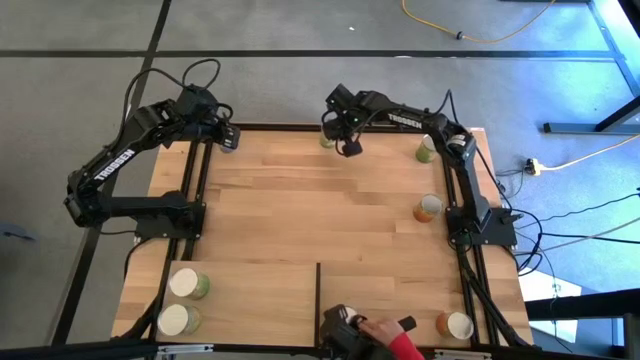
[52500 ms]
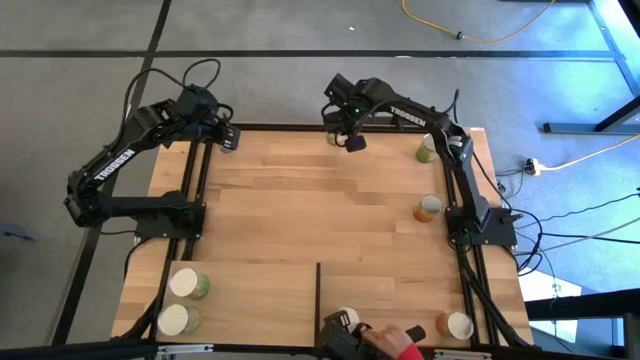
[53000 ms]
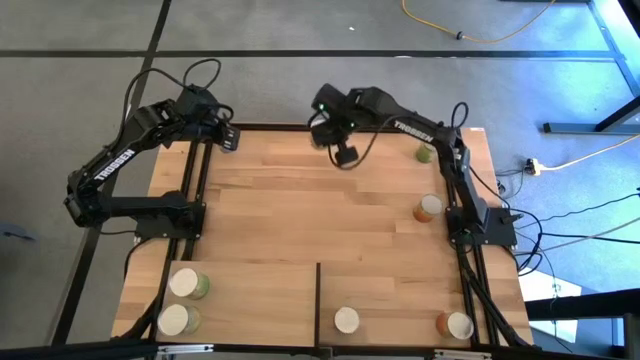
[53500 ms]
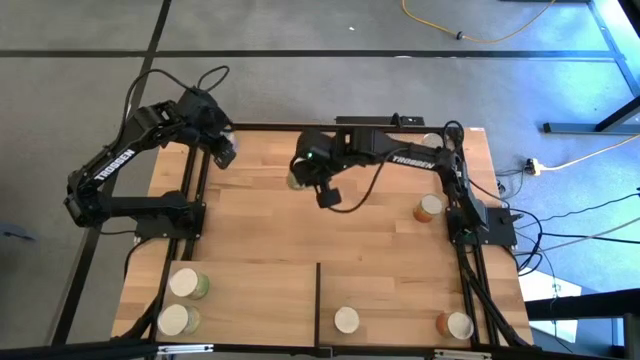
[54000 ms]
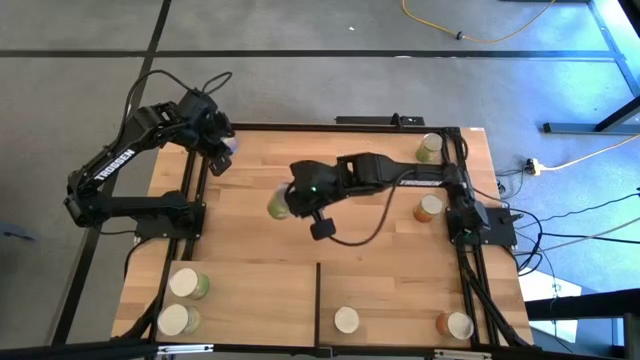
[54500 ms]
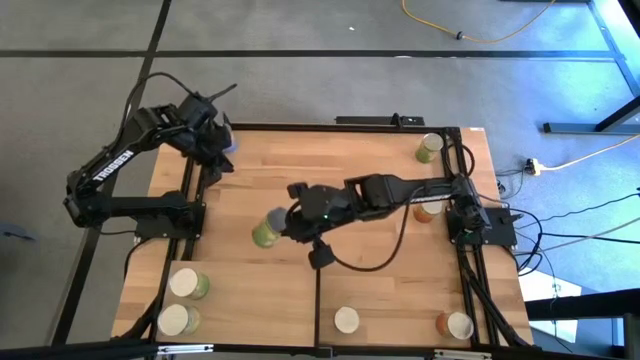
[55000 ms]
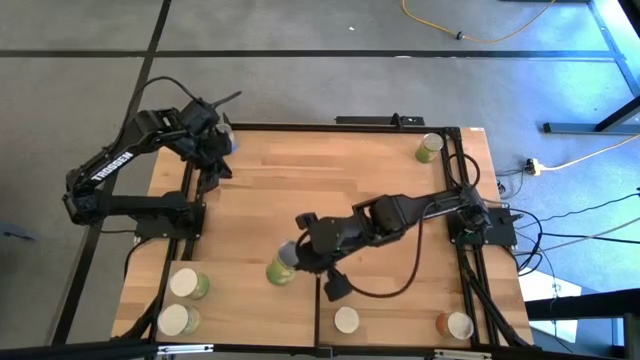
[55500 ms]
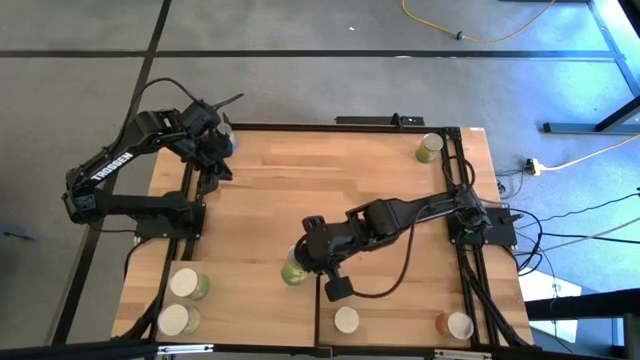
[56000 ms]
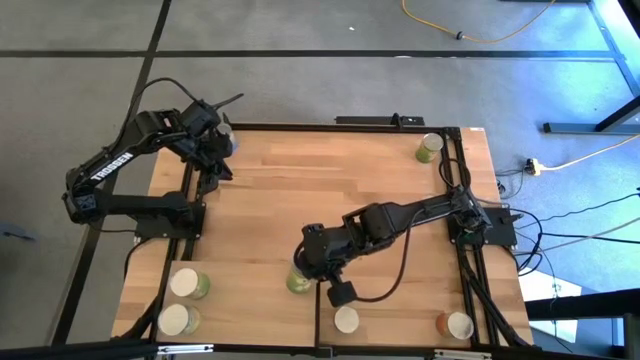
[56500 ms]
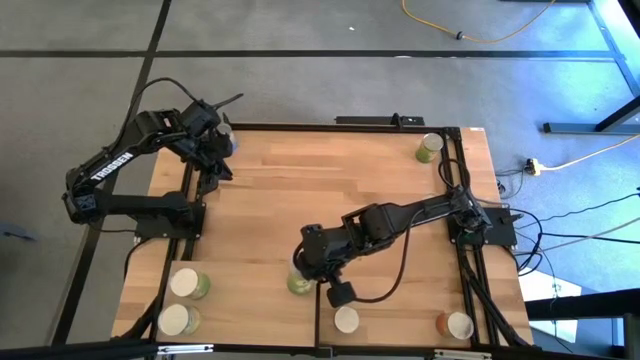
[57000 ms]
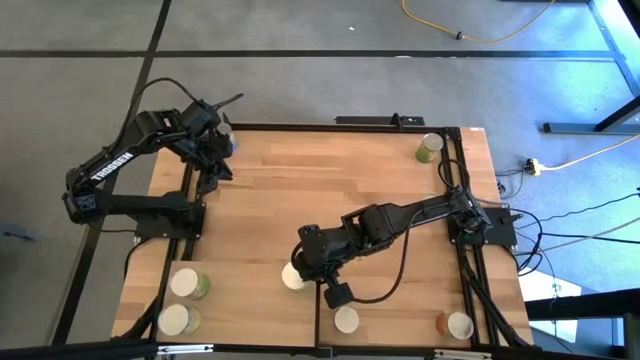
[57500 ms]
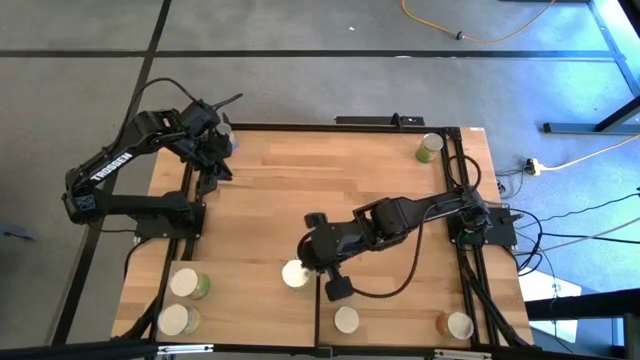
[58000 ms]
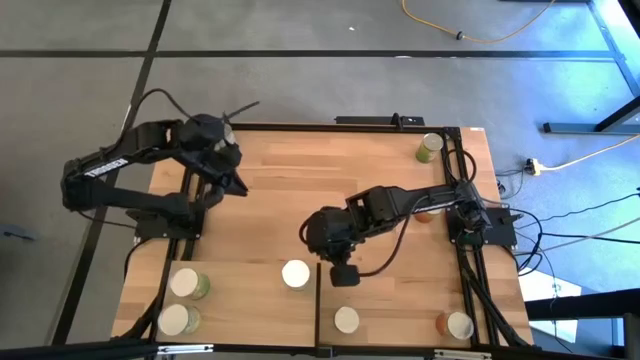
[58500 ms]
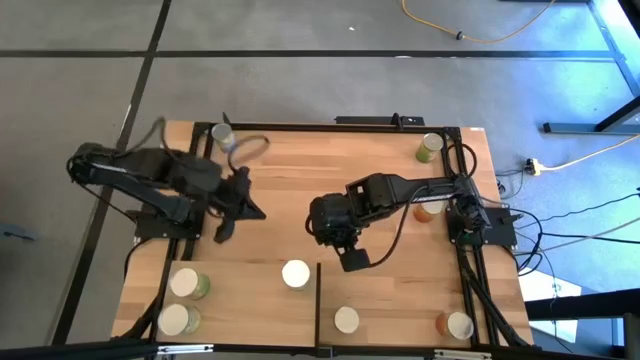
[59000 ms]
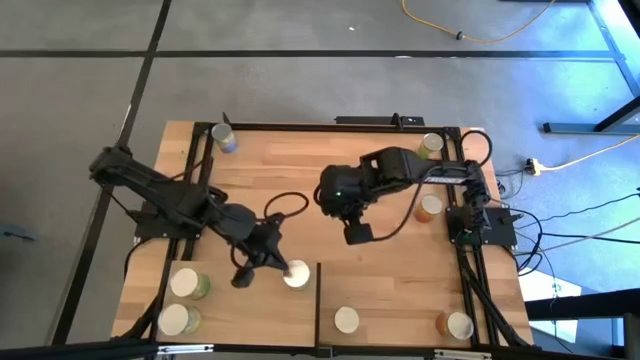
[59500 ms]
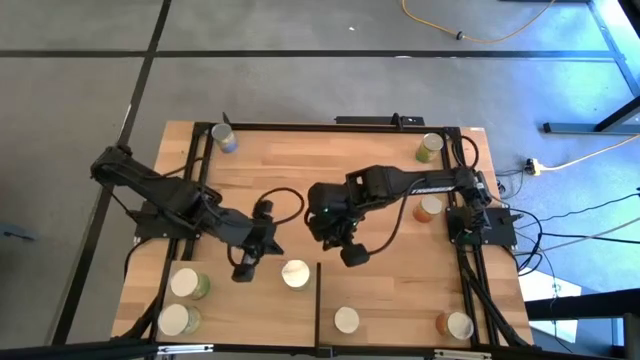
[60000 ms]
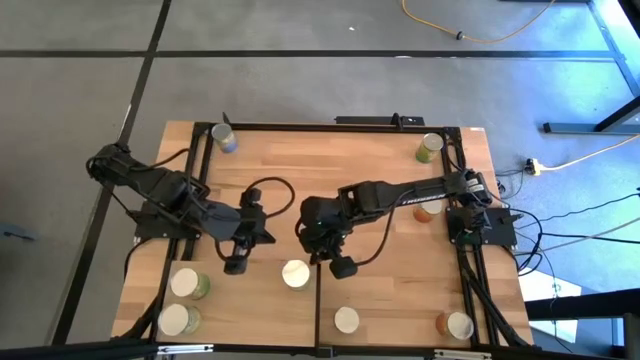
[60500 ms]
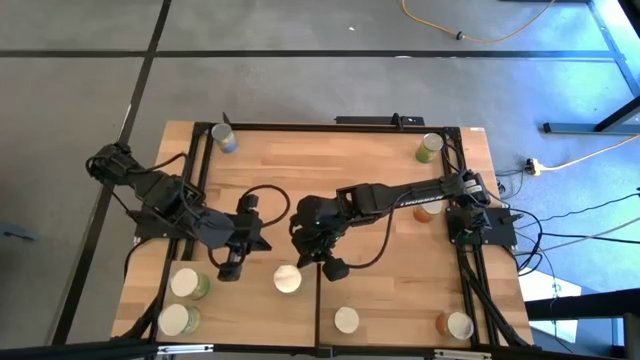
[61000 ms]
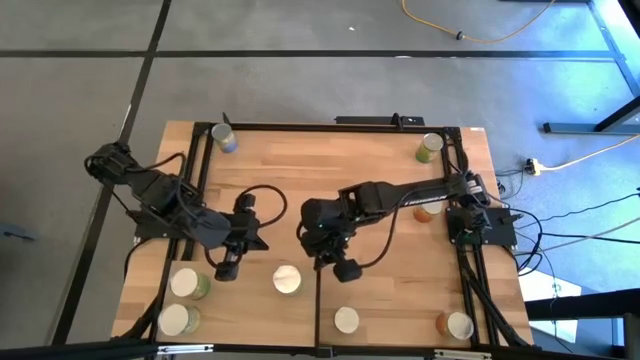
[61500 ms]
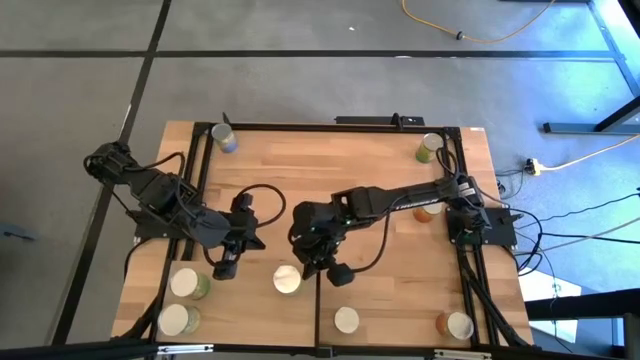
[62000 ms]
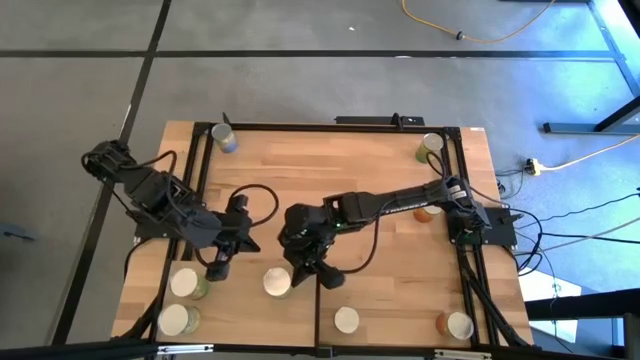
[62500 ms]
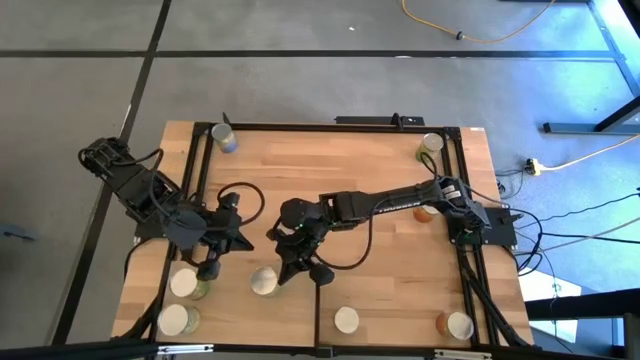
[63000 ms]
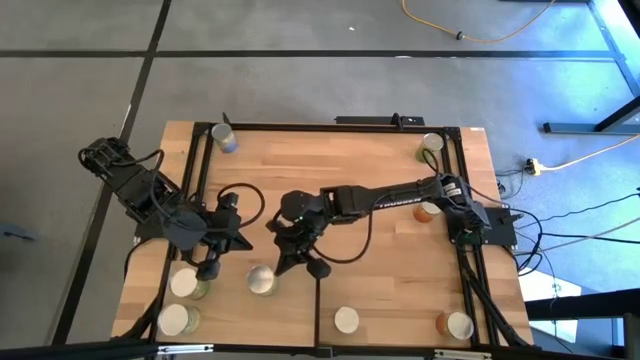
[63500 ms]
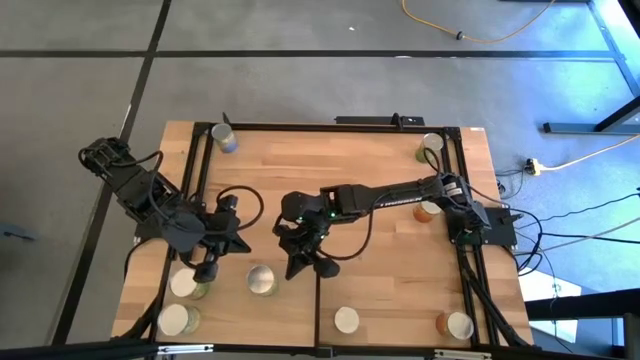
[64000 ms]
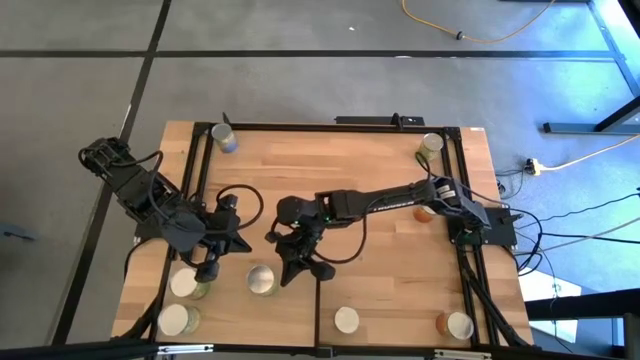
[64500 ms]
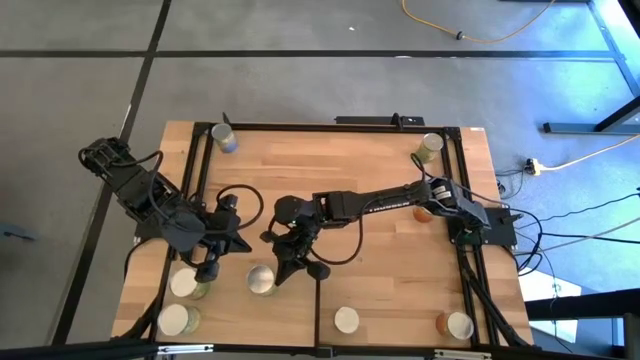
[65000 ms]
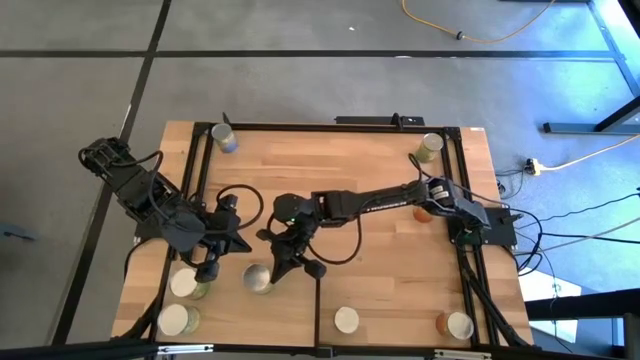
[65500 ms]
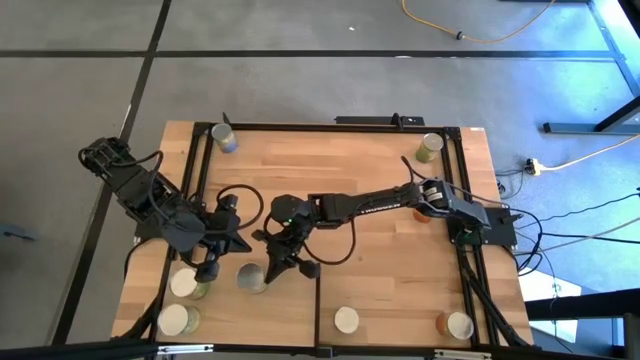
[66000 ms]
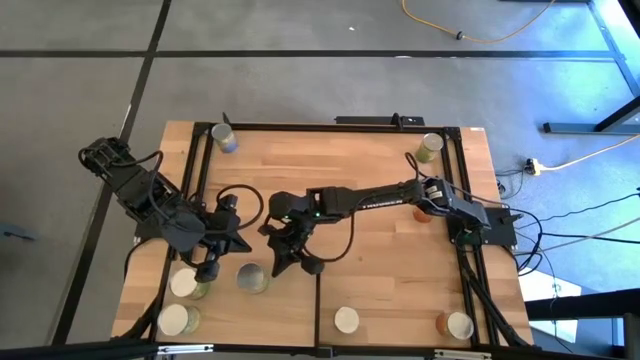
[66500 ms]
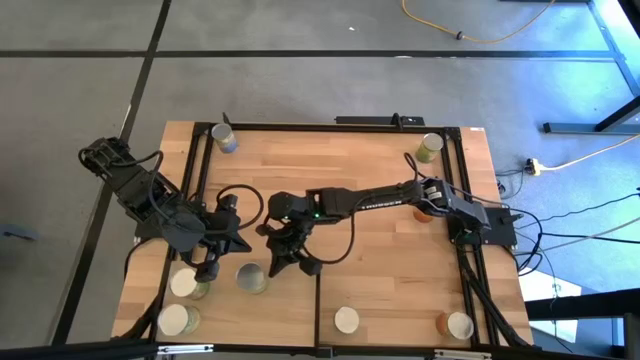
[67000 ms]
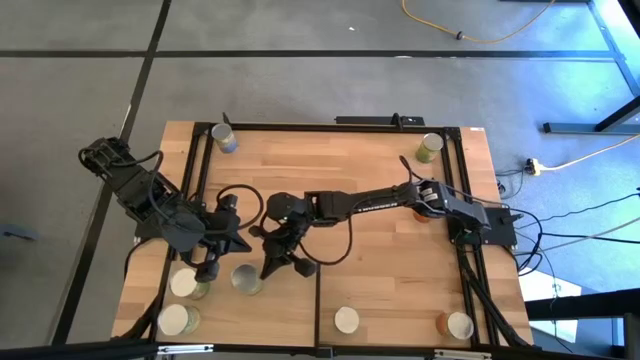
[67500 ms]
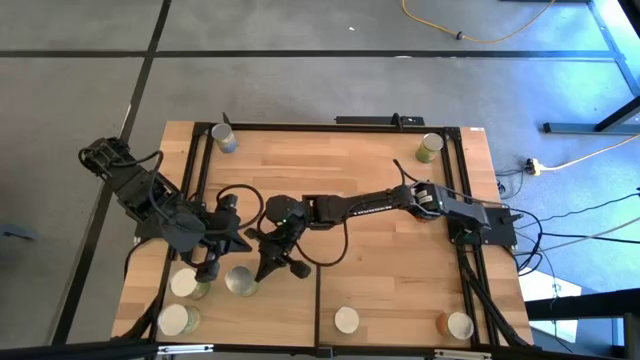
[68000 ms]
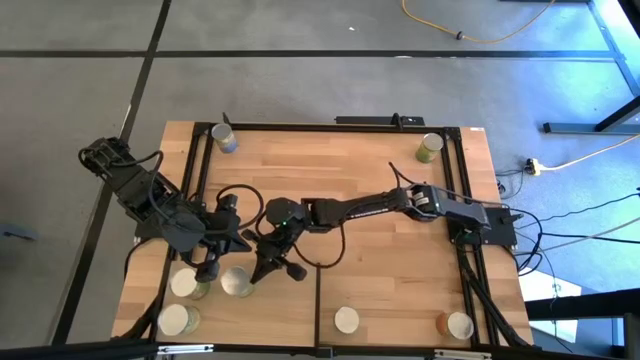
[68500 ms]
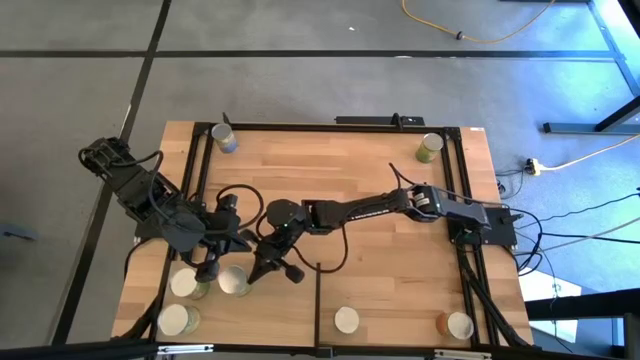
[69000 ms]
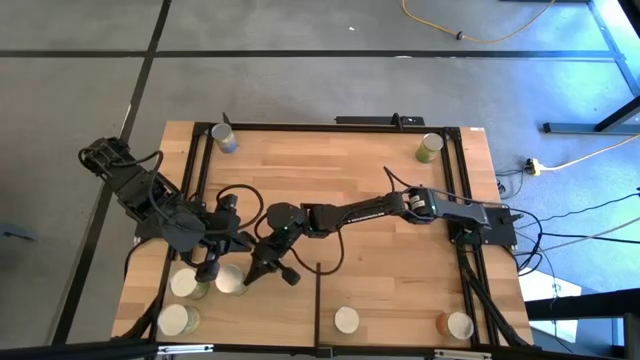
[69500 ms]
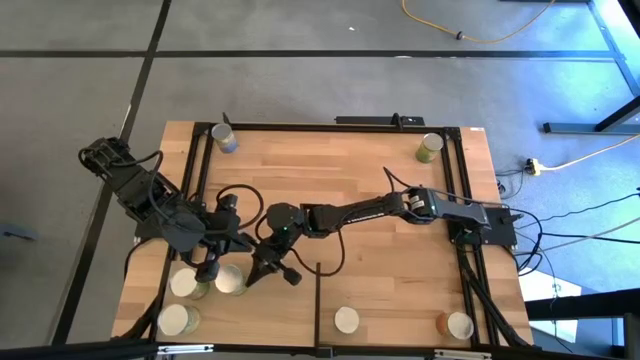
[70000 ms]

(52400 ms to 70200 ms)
Task: Pick and place cans onto a shelf
Put the canned peaches on the shelf

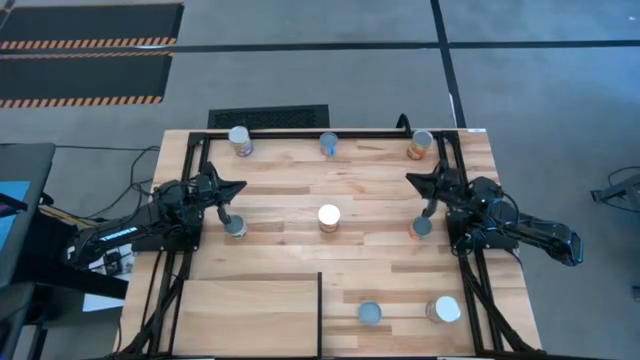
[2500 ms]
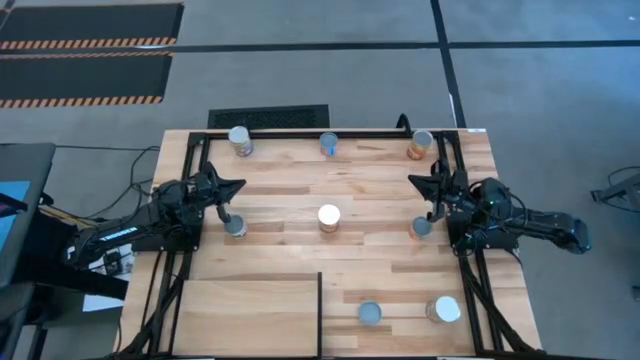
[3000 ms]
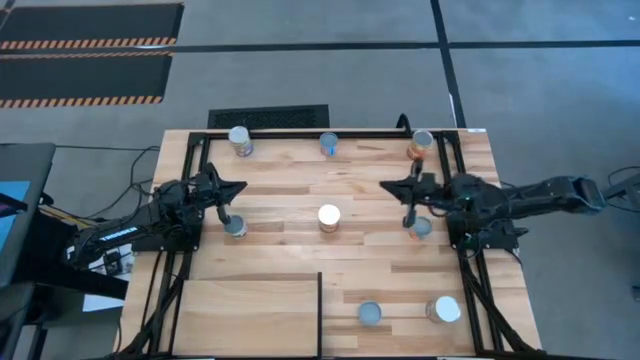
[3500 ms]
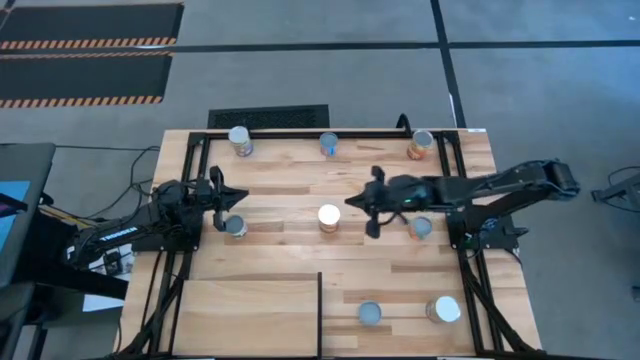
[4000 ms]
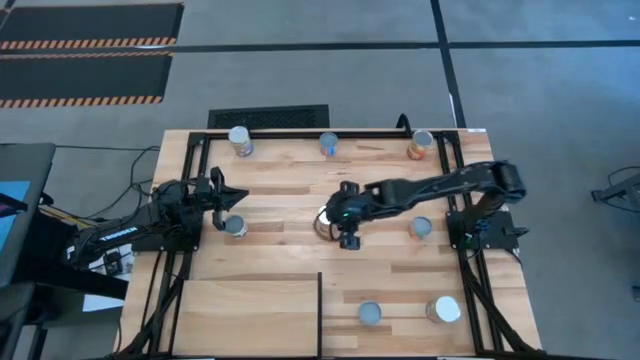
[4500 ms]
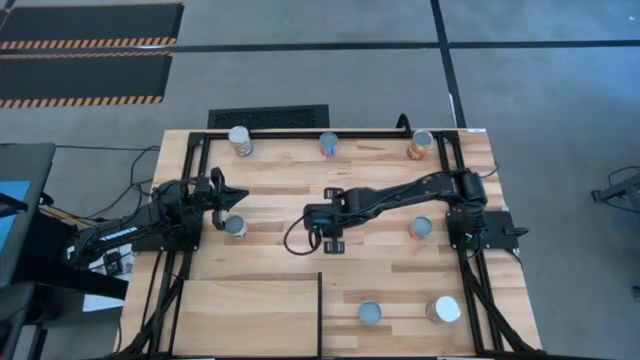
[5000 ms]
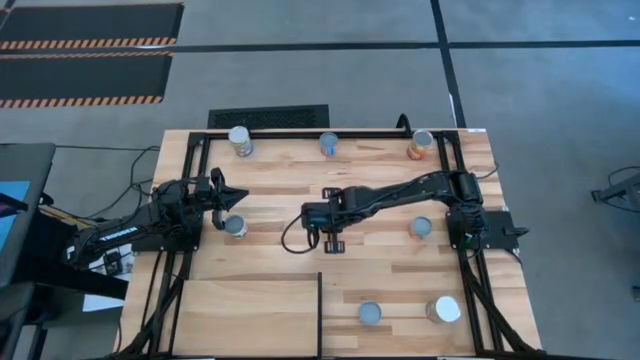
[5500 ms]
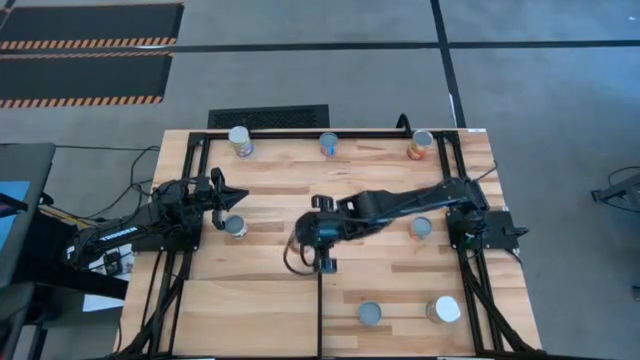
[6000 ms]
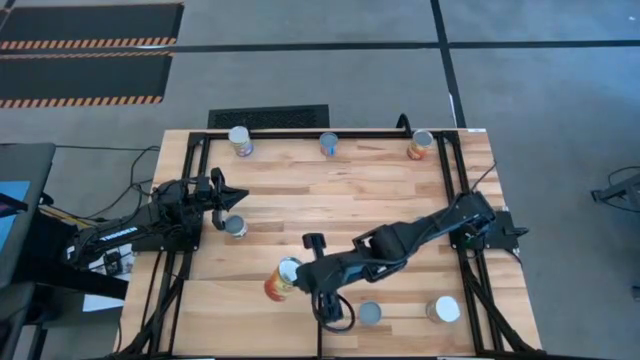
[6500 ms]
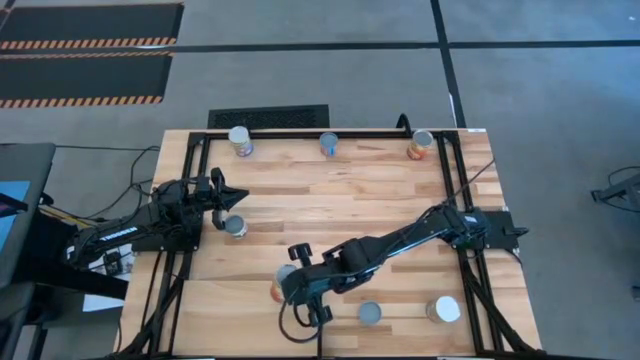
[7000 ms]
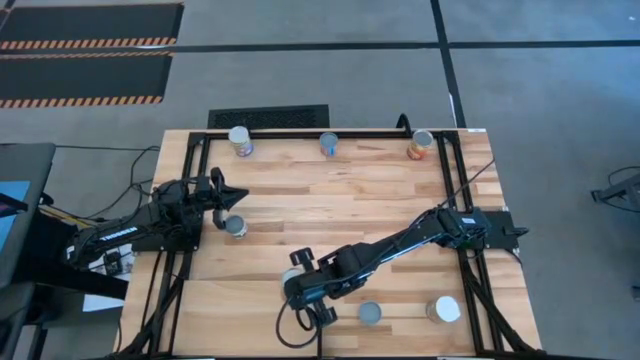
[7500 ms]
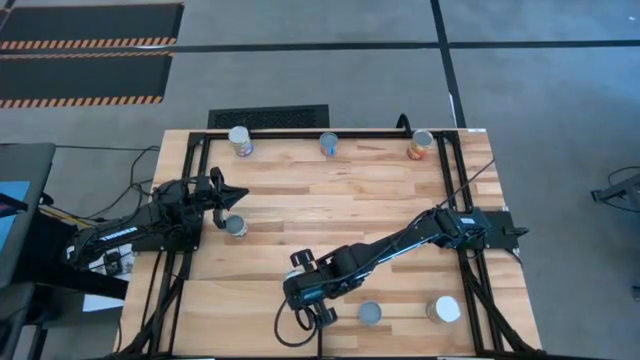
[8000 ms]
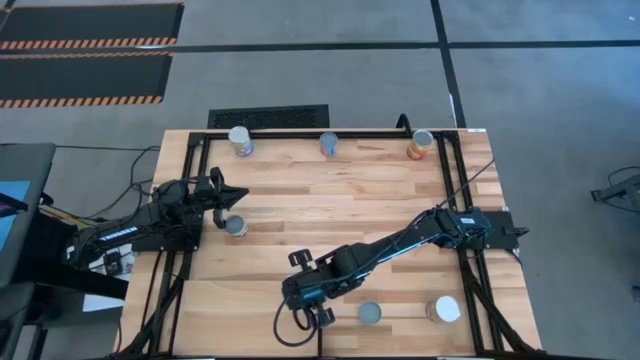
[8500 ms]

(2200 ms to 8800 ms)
Task: Pick and place cans onto a shelf
Put the bottom canned corn on the shelf
